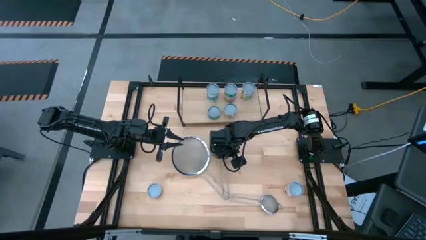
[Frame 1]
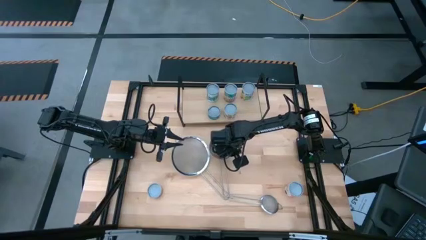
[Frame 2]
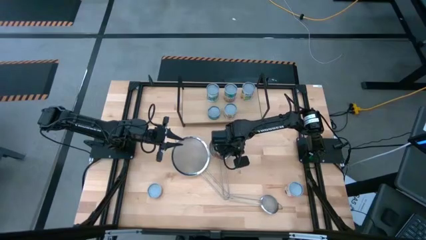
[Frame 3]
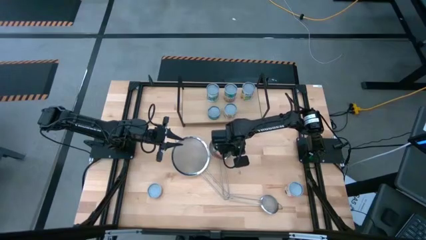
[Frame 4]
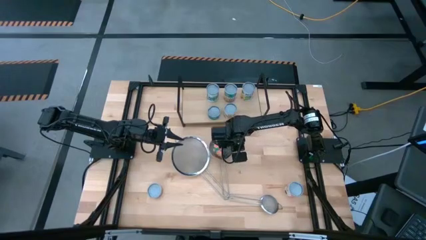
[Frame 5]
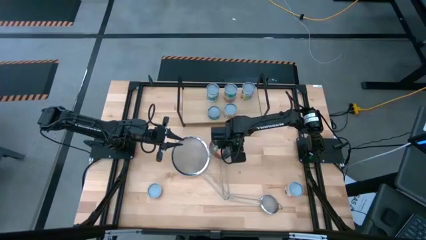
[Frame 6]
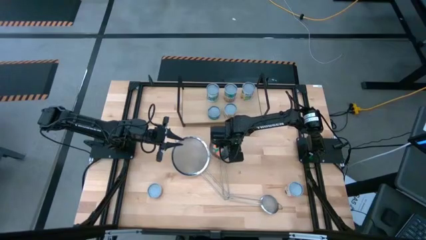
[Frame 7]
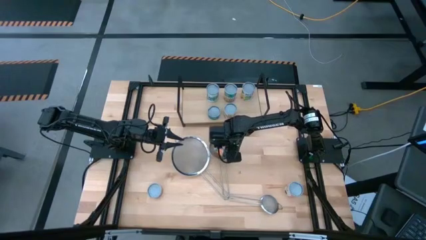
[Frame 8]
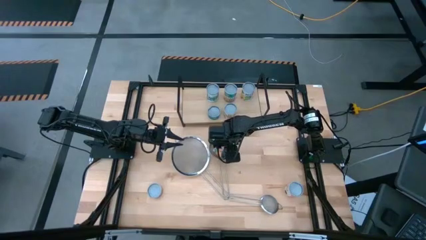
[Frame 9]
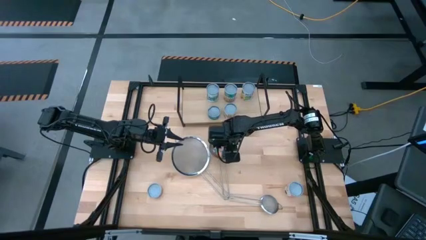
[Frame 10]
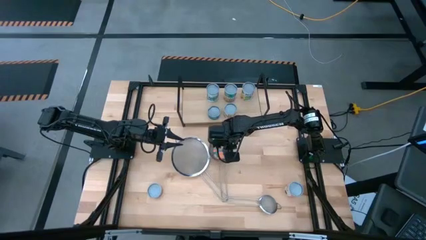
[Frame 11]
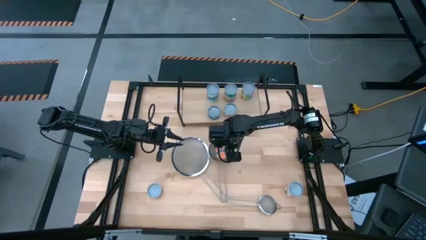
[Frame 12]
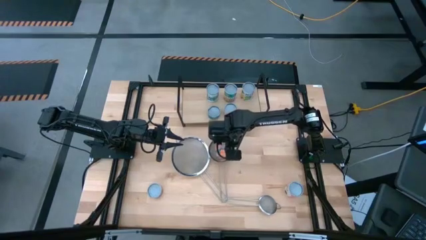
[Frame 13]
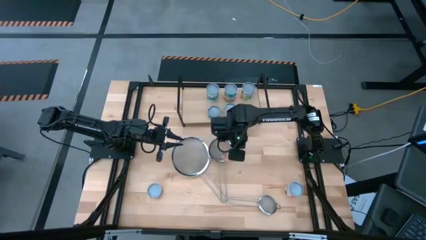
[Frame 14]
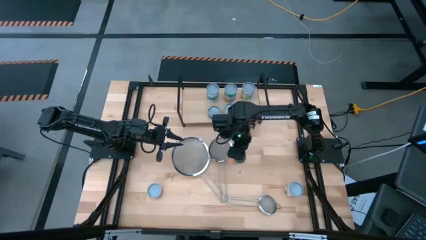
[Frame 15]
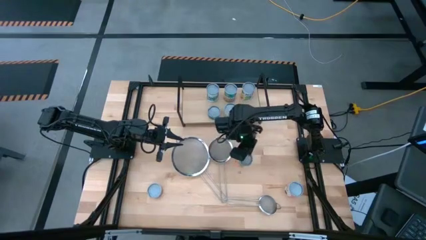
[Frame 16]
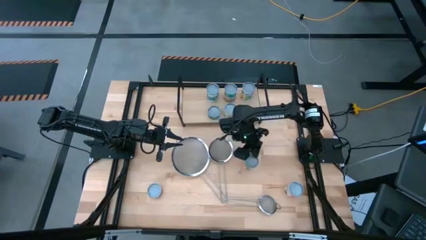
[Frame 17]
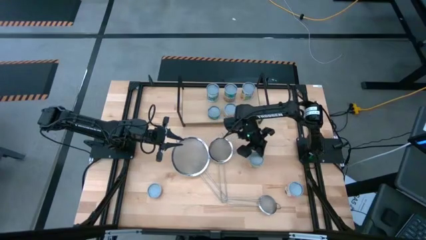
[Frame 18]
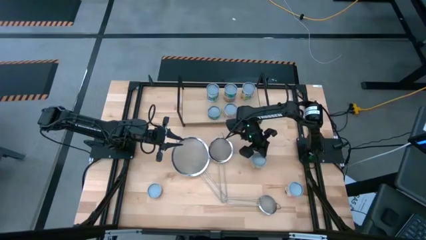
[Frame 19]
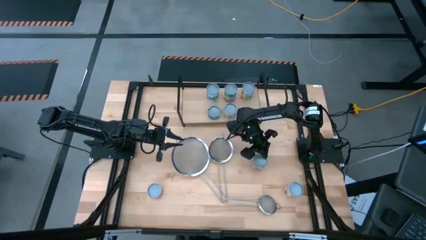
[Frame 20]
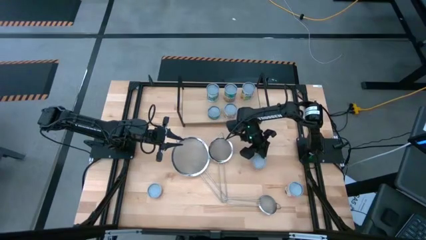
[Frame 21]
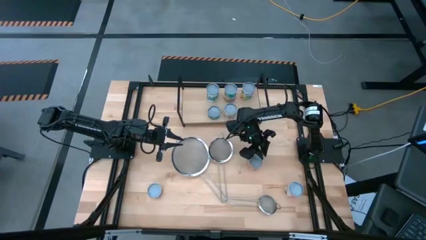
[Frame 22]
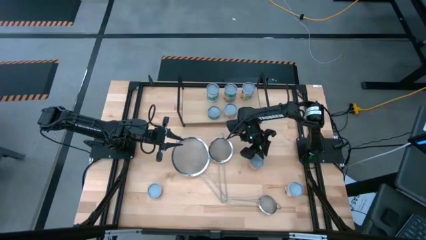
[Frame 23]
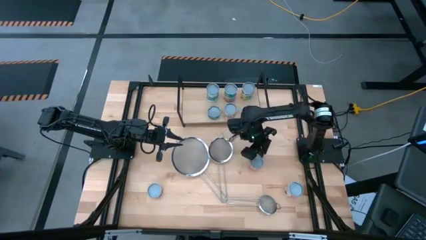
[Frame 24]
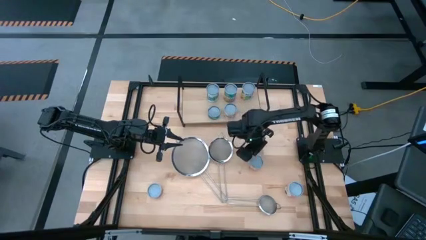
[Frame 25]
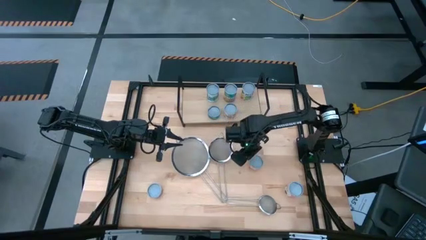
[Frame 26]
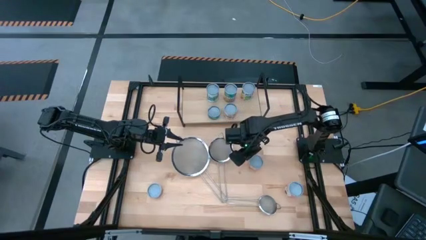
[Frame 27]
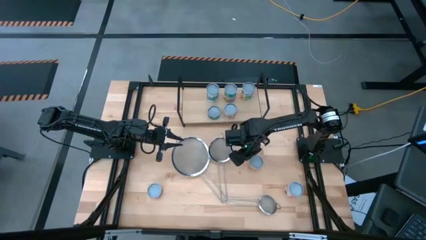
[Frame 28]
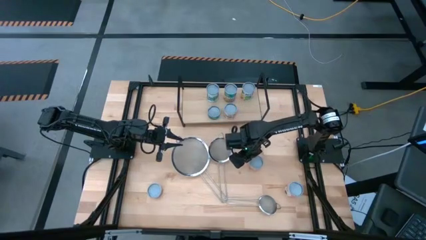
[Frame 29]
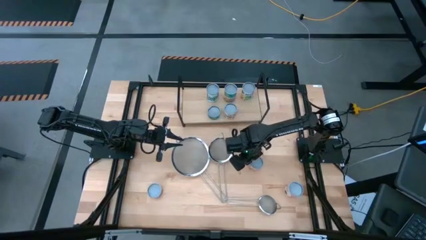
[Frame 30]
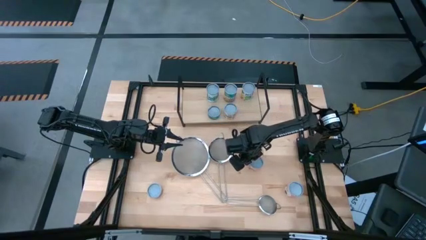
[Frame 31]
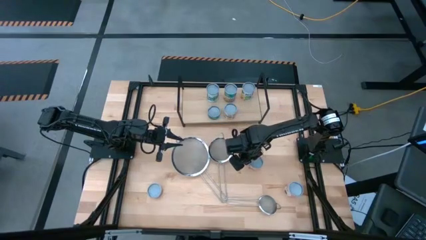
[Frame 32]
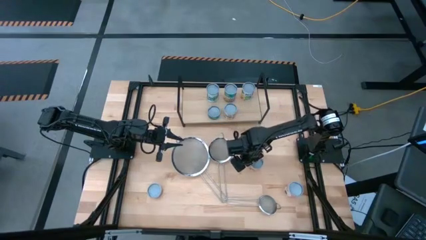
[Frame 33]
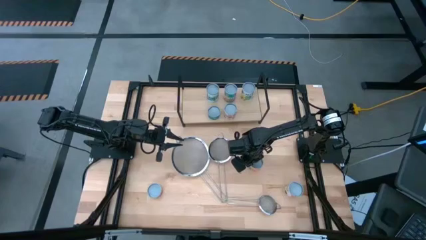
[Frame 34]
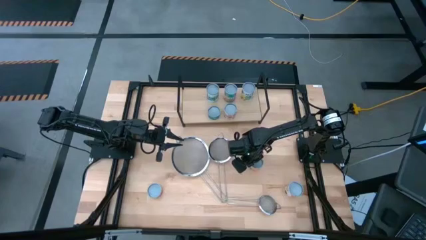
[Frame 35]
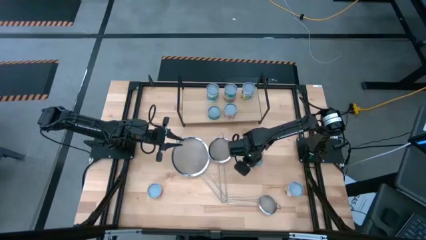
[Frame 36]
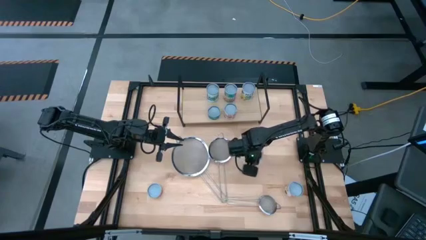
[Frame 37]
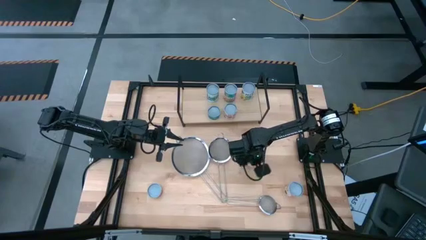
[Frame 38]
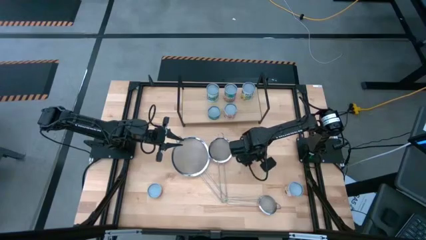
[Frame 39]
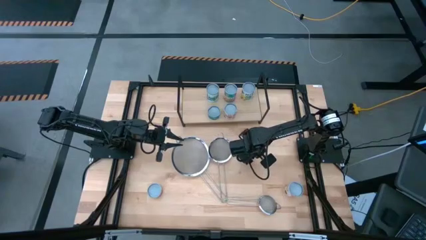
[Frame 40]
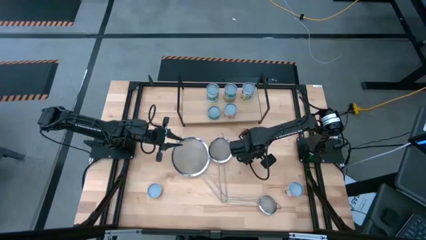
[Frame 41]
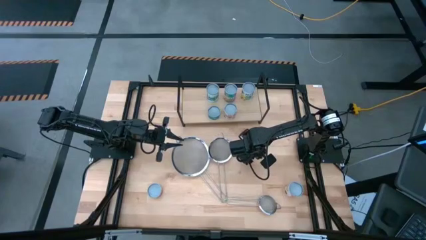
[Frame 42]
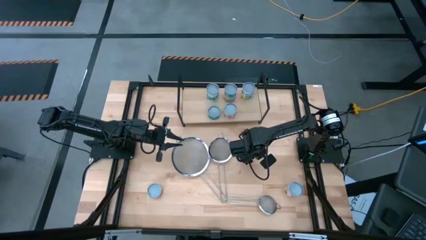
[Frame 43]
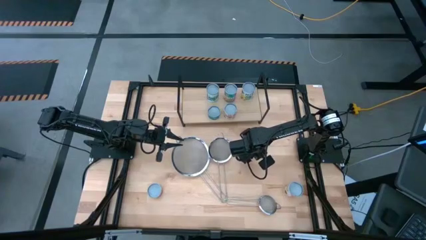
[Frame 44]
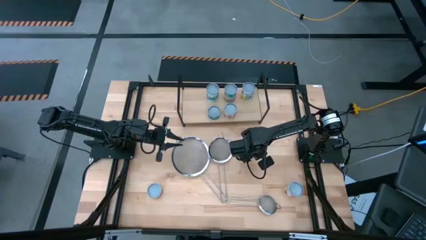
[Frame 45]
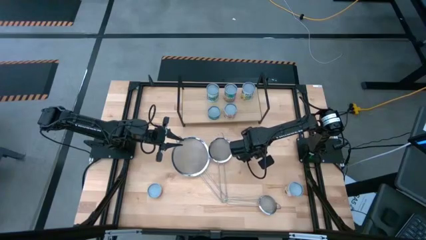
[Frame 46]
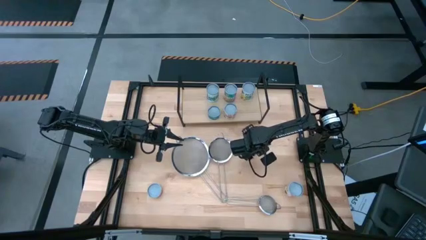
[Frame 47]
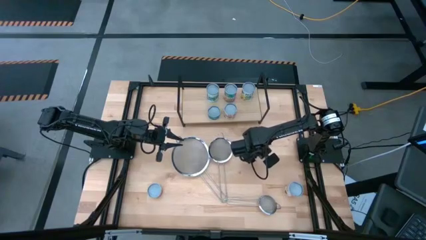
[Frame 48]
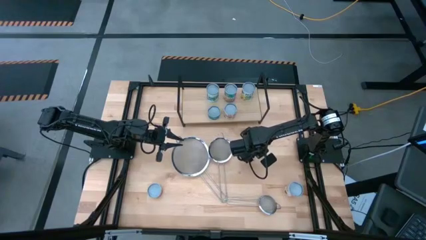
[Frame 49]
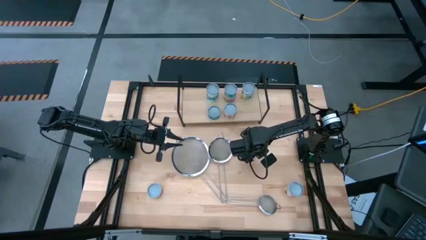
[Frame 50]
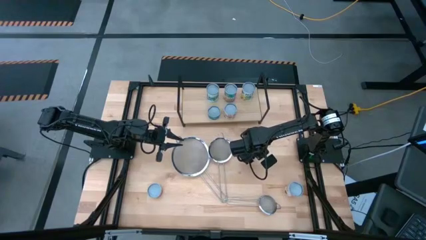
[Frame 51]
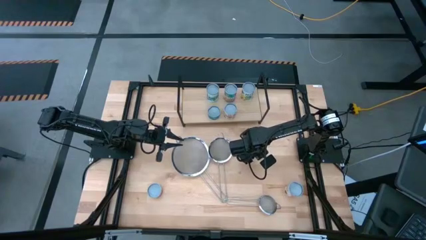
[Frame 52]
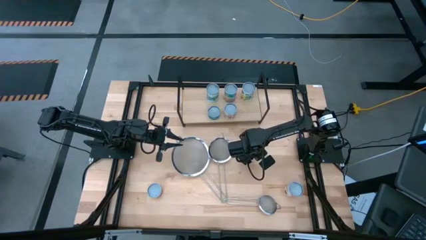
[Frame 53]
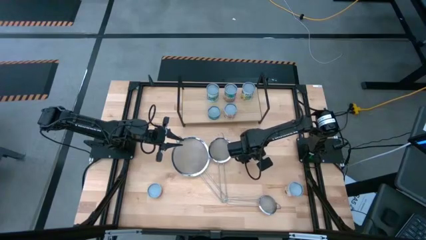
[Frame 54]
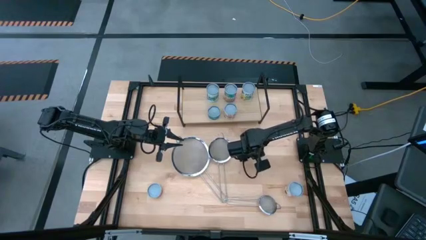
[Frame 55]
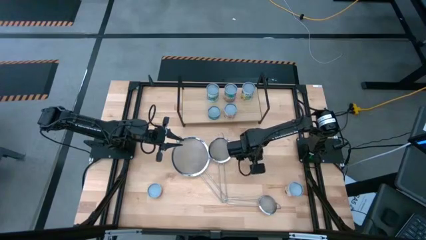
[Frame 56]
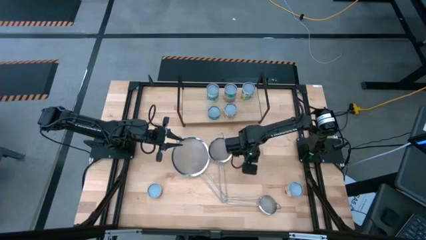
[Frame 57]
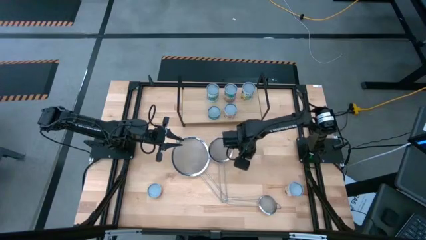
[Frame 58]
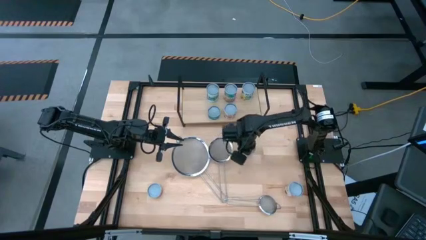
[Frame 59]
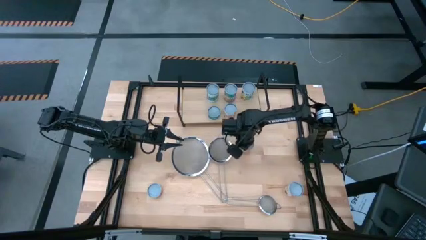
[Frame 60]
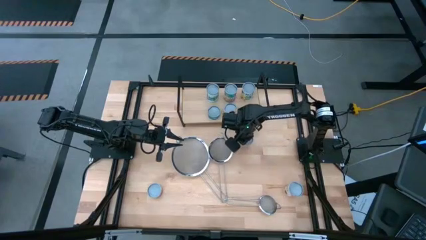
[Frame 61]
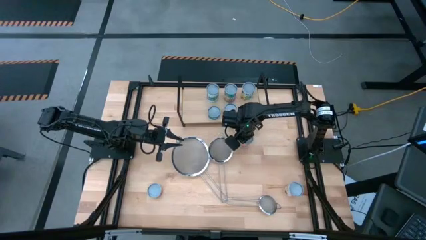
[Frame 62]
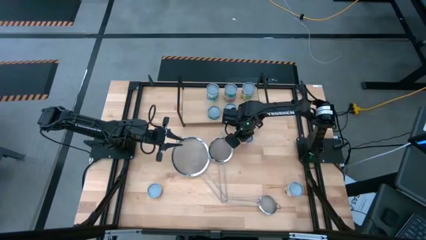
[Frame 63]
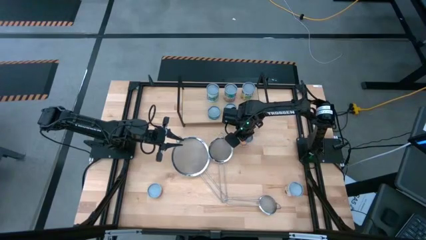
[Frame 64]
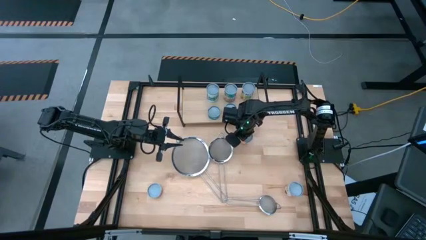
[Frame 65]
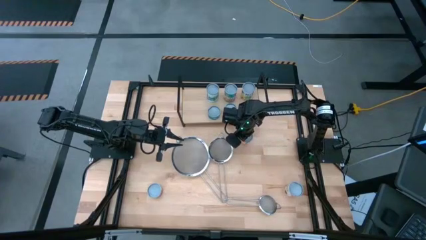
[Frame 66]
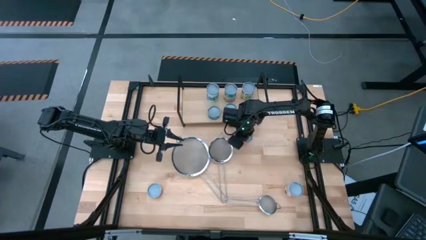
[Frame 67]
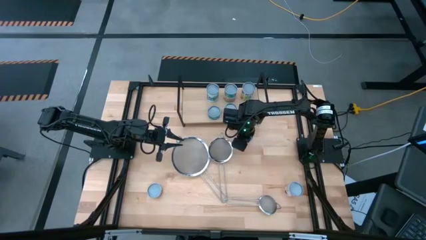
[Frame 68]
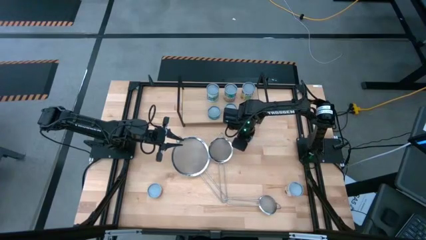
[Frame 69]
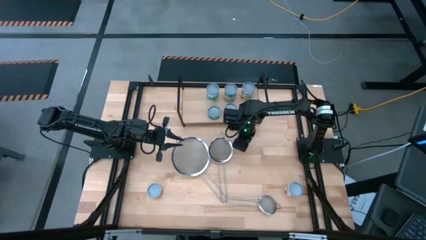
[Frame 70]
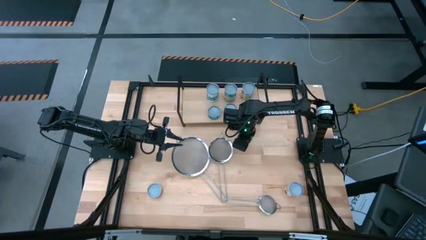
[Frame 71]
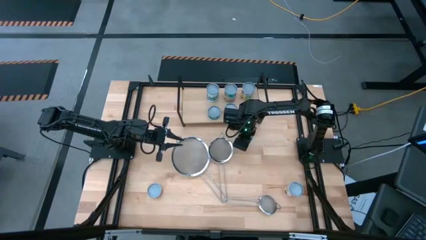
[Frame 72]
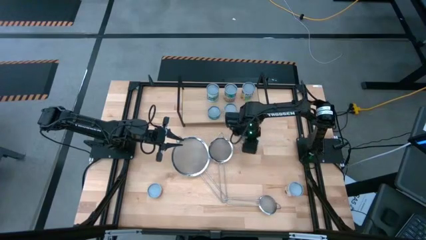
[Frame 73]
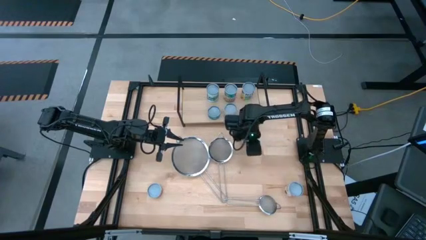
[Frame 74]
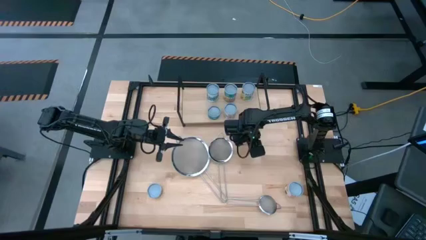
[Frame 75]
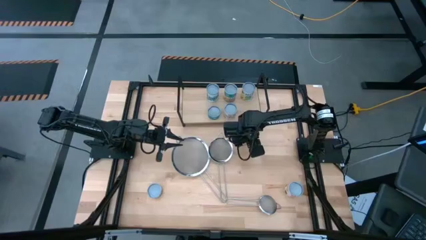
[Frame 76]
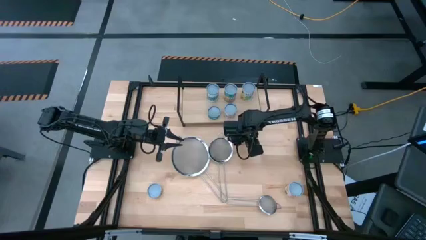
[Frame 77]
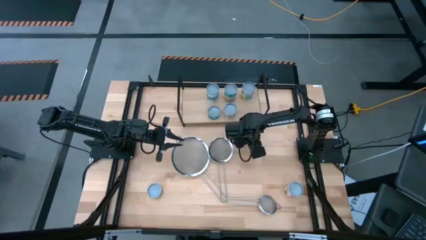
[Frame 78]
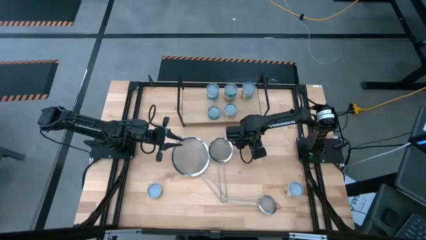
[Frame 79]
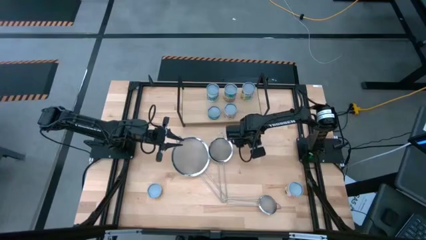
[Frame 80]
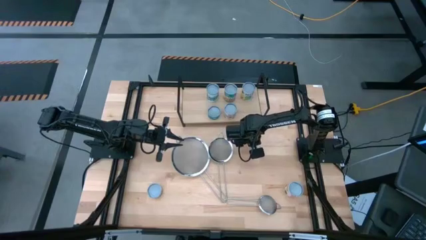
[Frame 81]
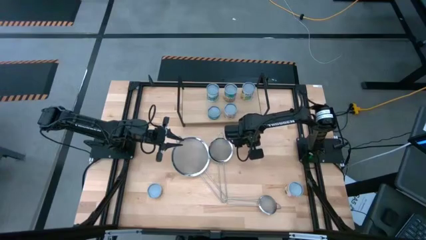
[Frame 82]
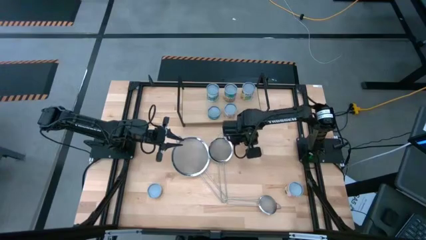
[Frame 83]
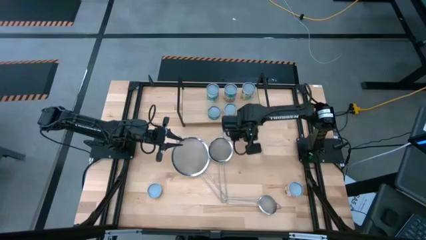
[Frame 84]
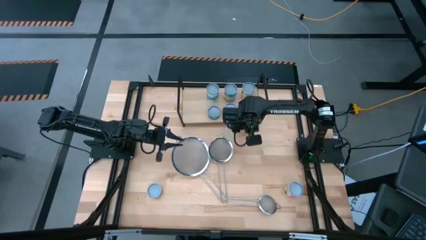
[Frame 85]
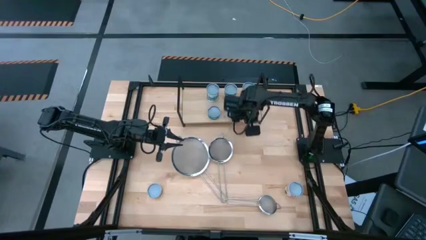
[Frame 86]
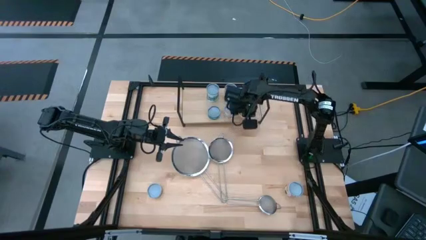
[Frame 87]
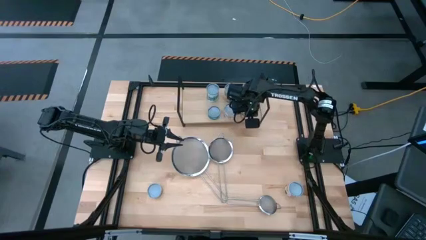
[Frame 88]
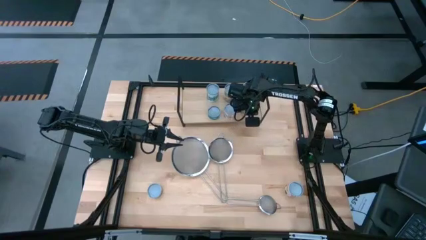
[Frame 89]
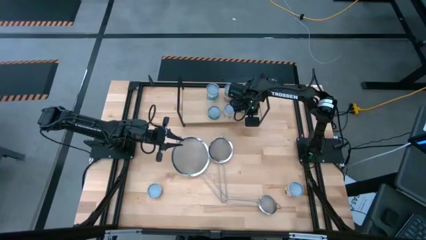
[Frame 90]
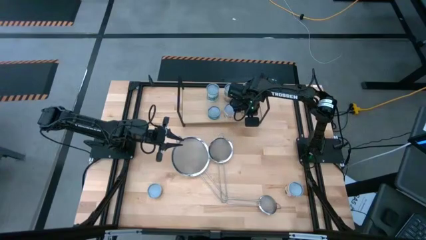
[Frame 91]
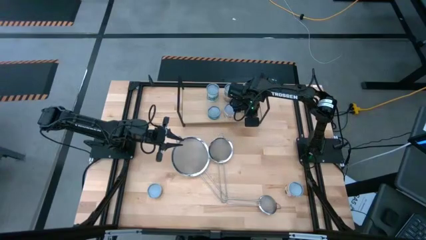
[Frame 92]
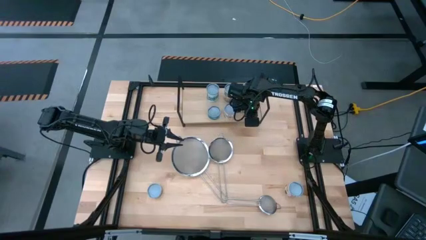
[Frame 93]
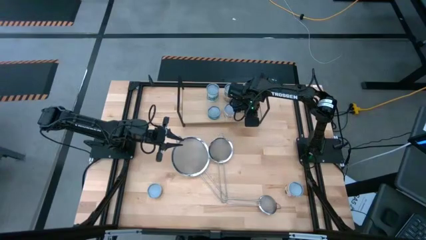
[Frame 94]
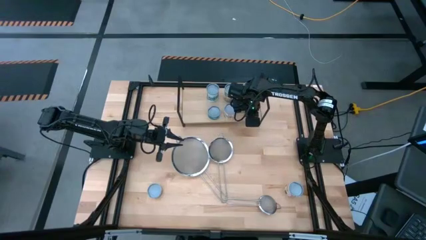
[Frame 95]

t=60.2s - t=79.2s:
Task: Pick and place cans onto a shelf
Put the canned oranges on the shelf
